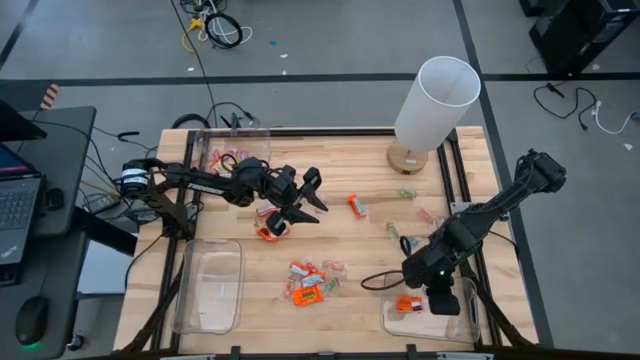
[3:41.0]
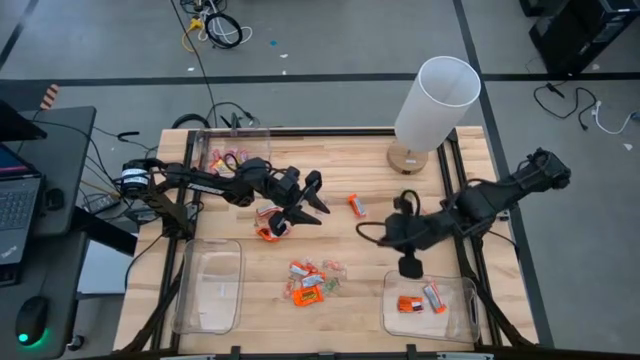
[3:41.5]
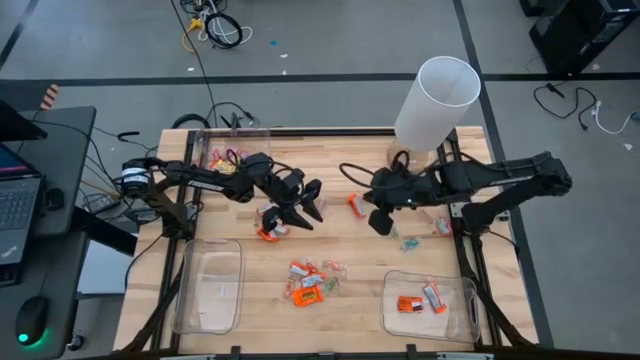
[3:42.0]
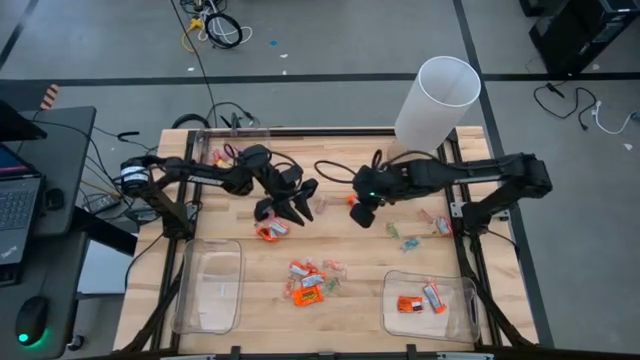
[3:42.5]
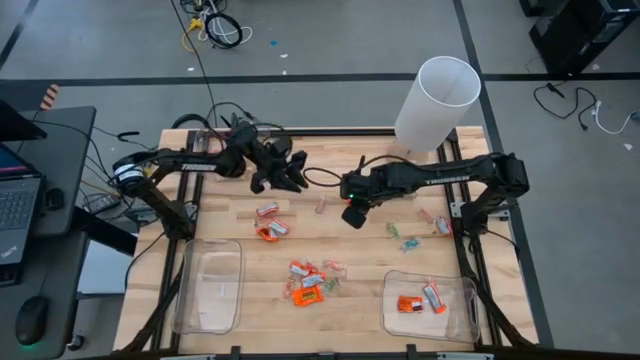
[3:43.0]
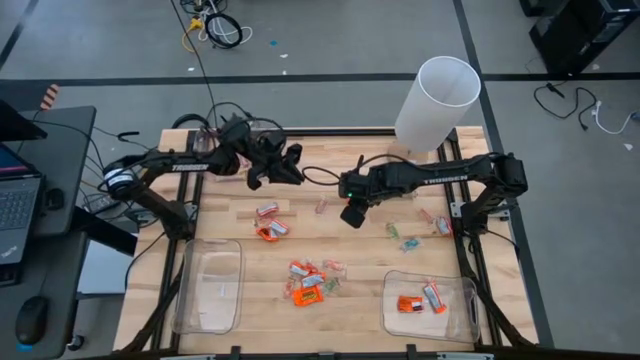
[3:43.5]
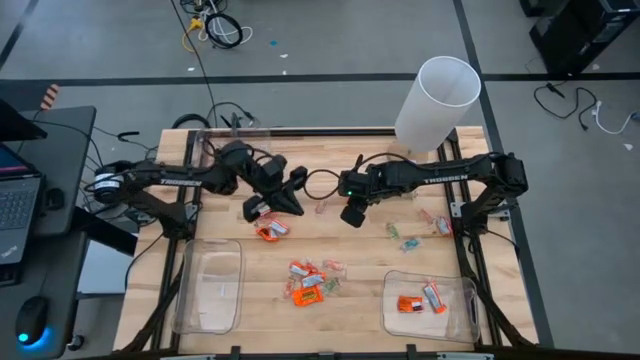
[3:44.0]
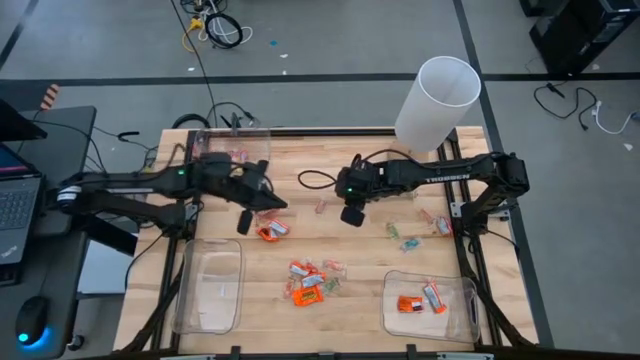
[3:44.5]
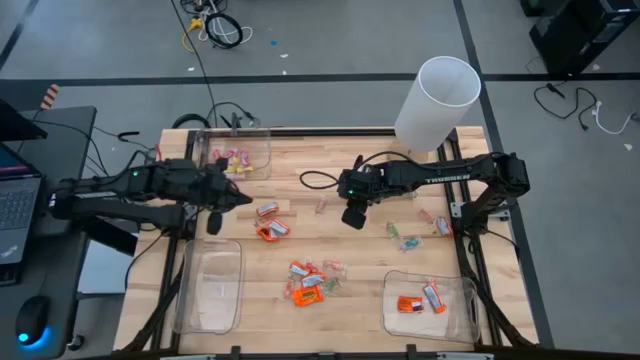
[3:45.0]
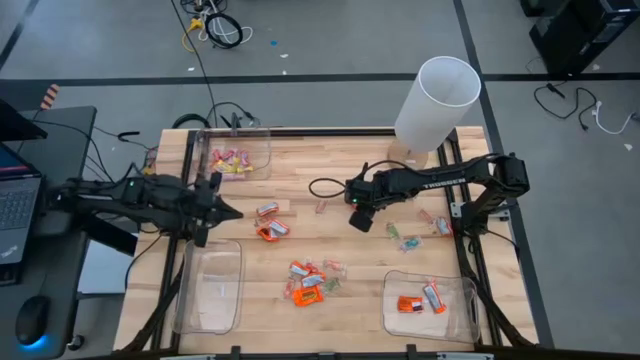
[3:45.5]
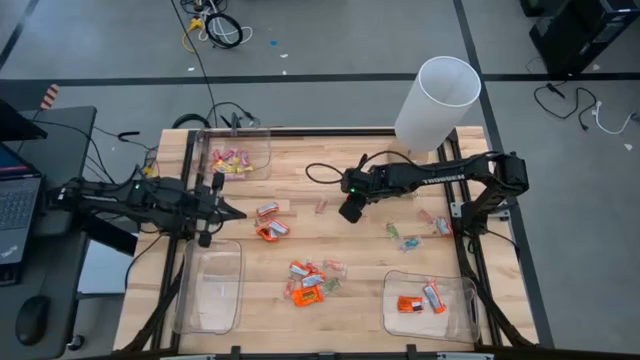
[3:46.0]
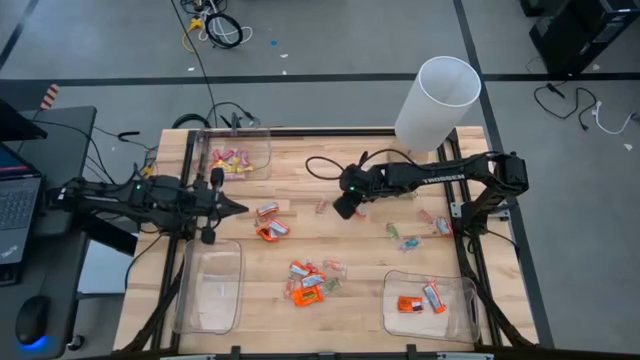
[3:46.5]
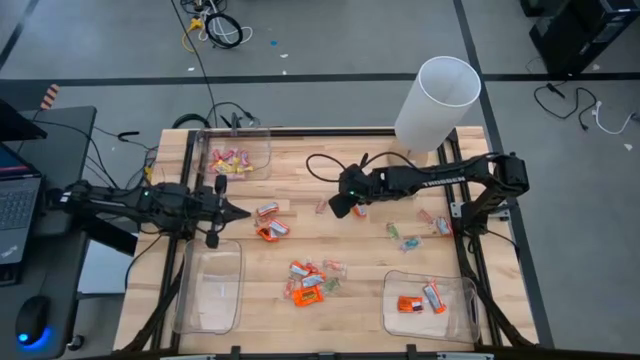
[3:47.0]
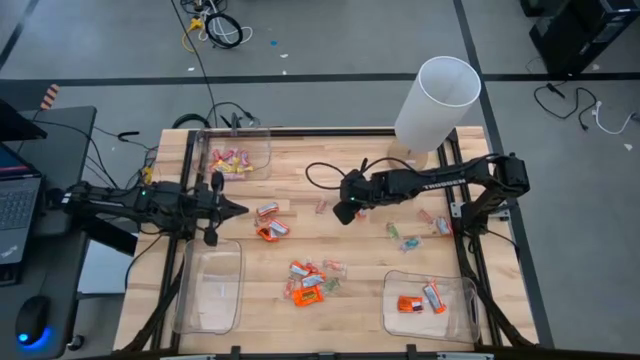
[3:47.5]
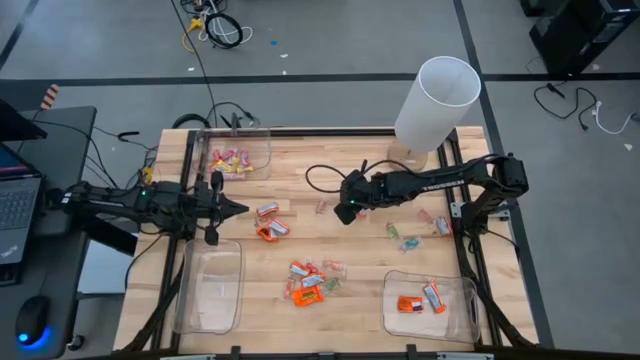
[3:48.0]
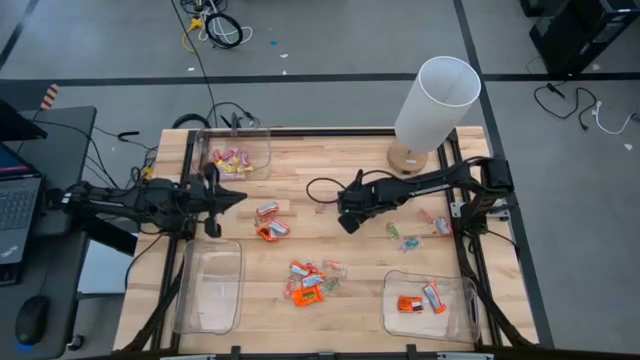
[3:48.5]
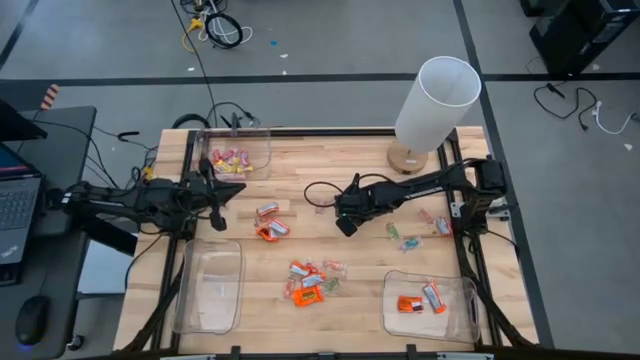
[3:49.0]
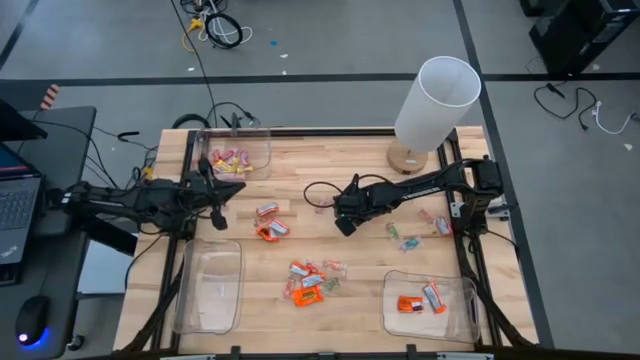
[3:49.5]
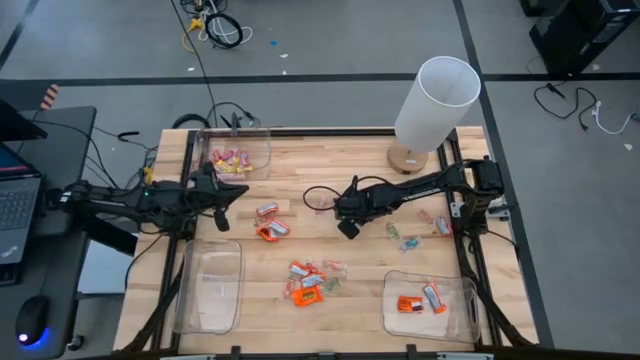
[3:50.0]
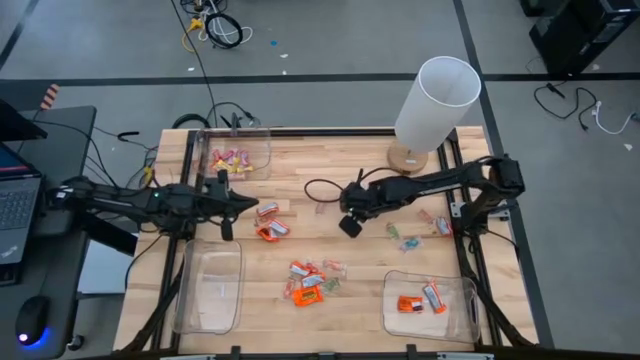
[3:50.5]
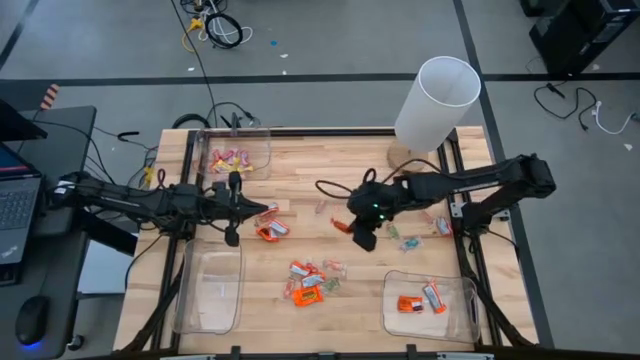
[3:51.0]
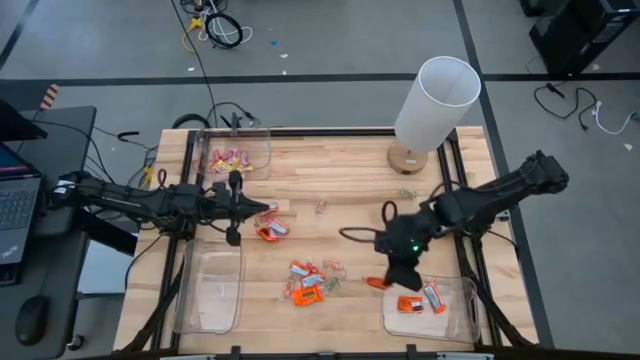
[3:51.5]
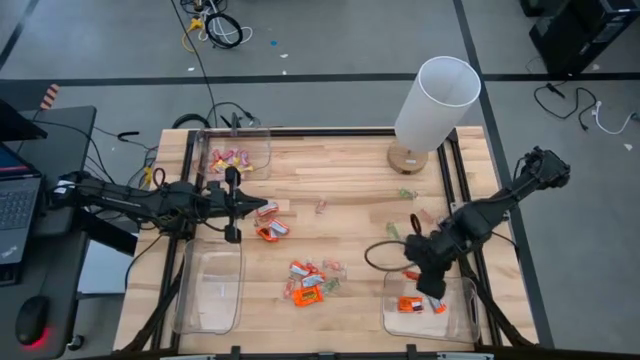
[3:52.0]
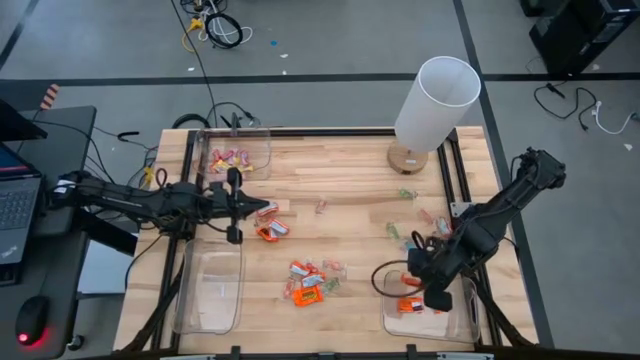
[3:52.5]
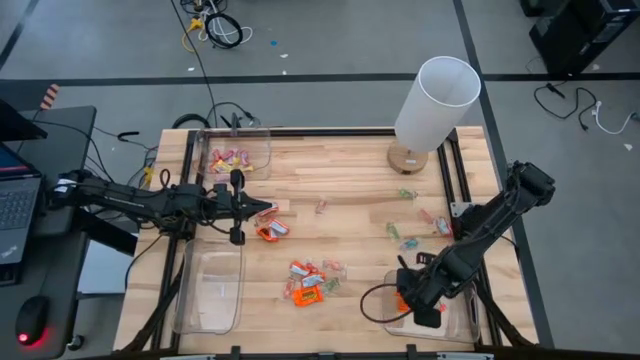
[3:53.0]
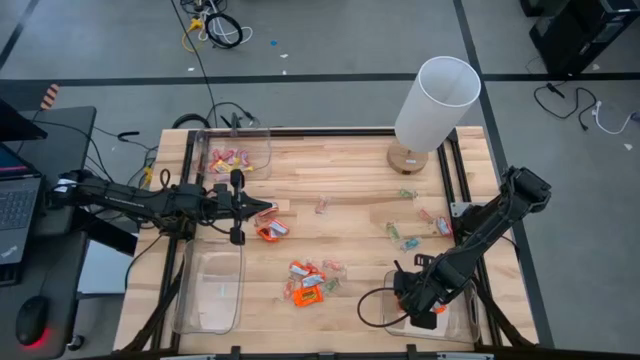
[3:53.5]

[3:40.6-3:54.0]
Task: Sort candy
Put the chocolate into the bottom right transparent bin

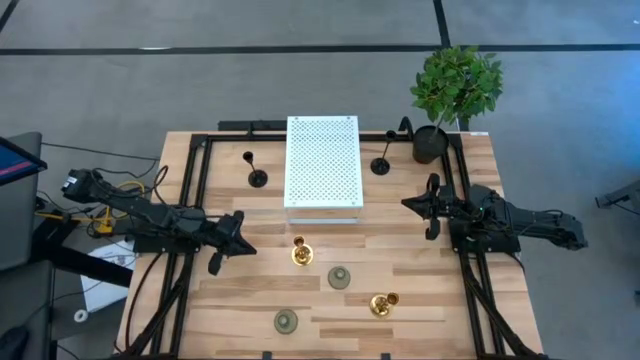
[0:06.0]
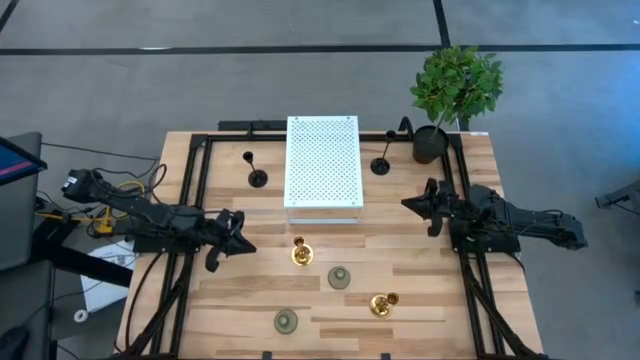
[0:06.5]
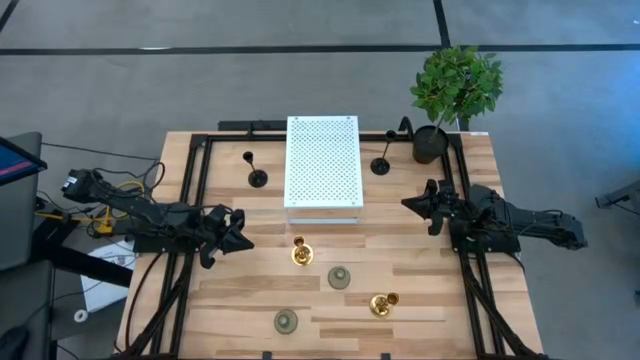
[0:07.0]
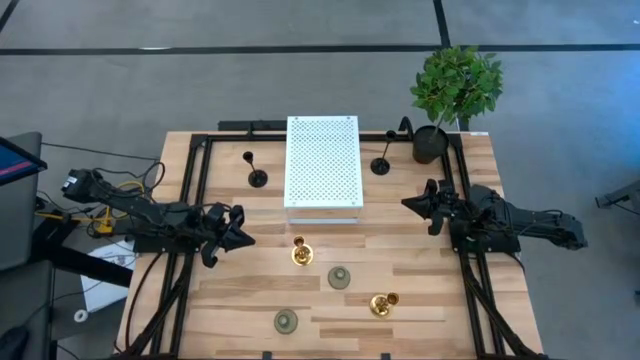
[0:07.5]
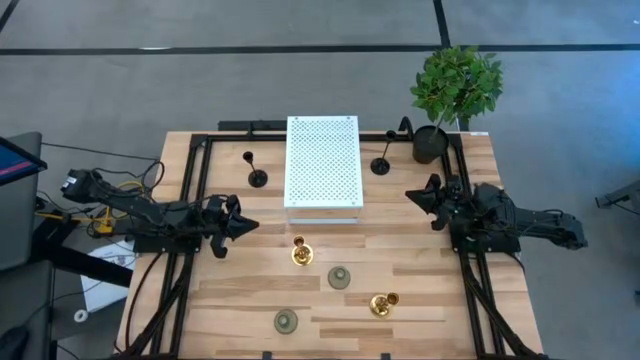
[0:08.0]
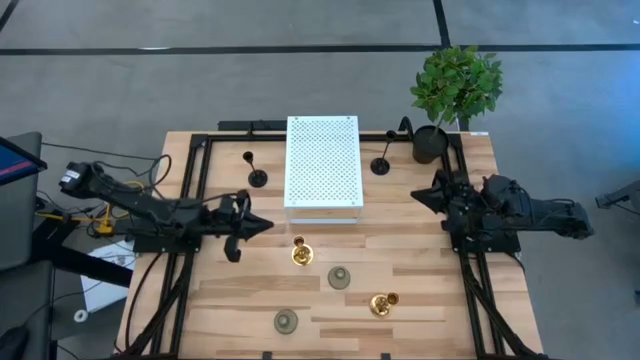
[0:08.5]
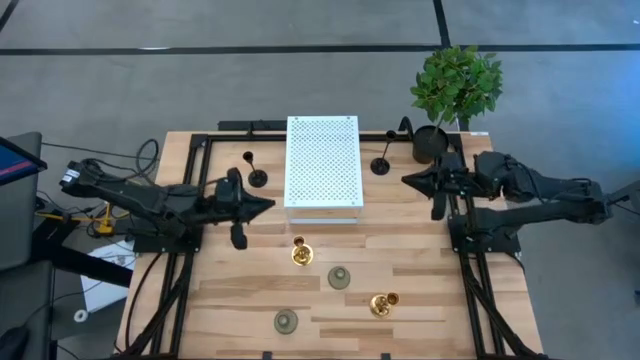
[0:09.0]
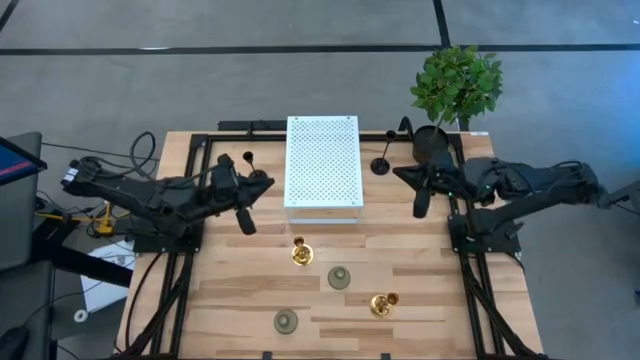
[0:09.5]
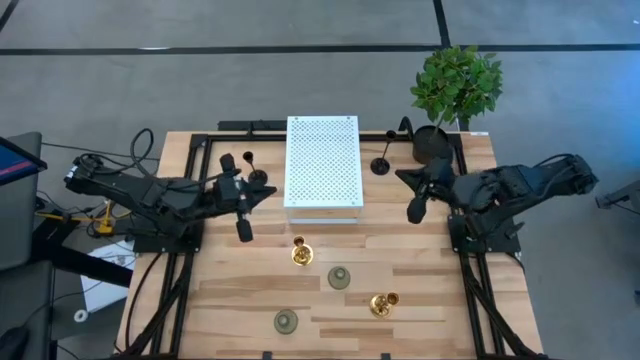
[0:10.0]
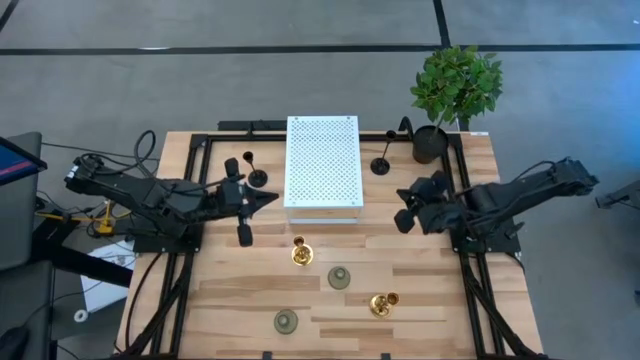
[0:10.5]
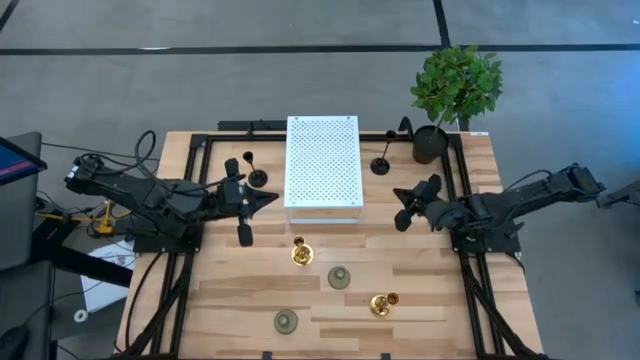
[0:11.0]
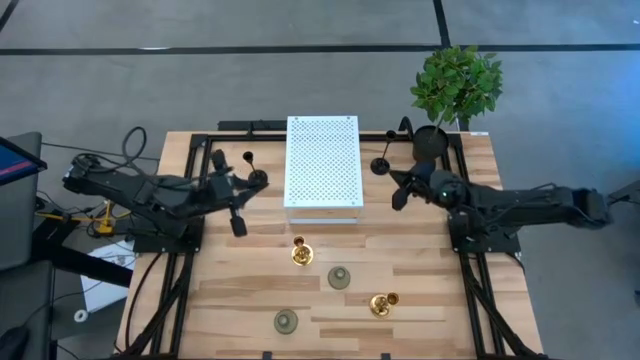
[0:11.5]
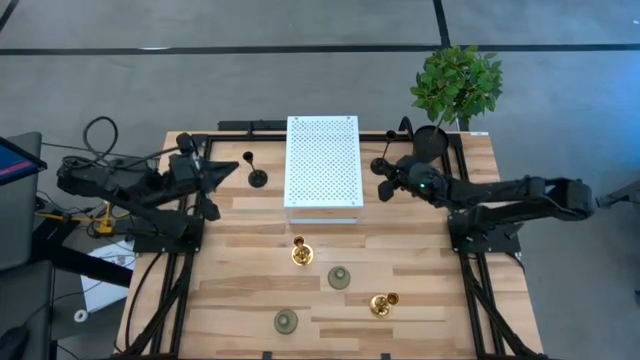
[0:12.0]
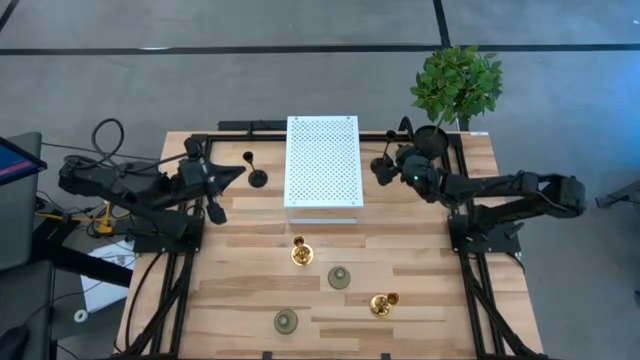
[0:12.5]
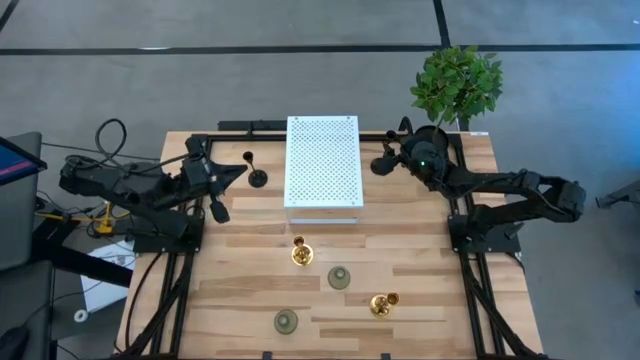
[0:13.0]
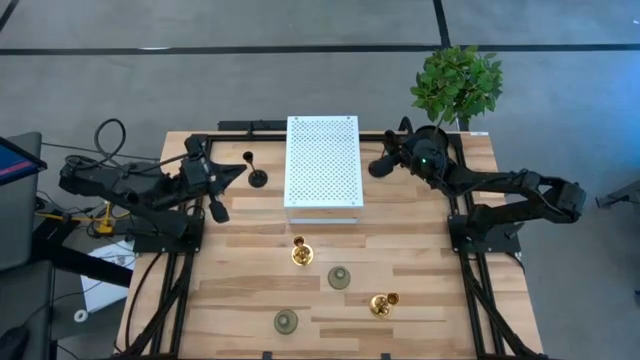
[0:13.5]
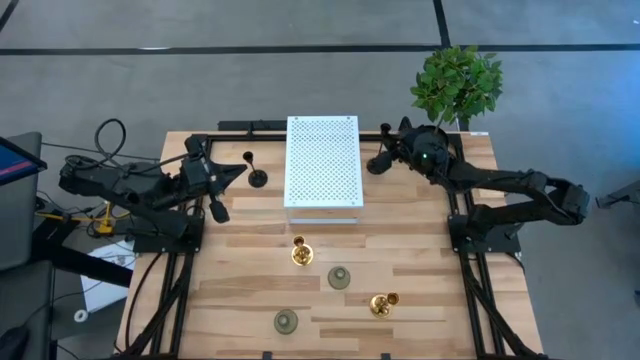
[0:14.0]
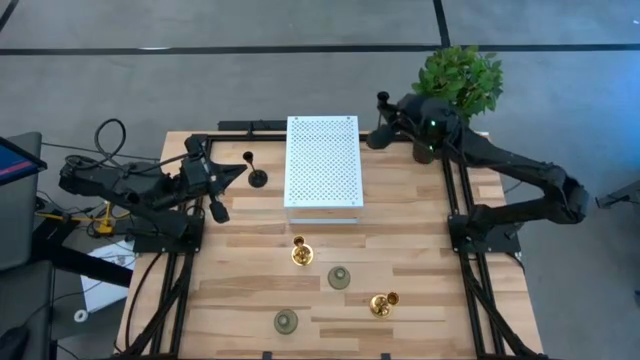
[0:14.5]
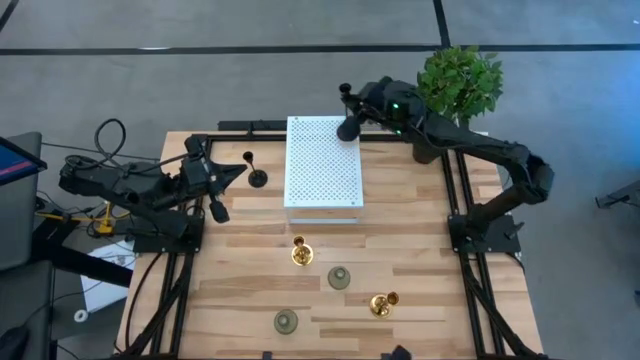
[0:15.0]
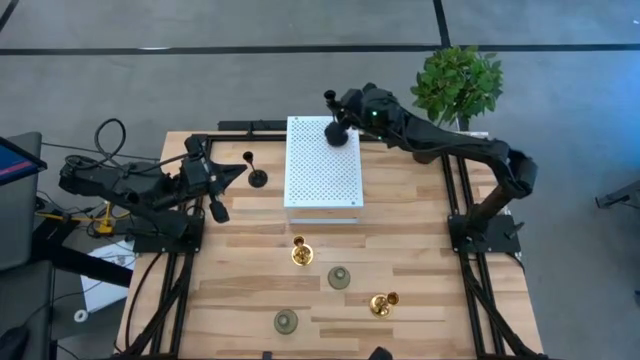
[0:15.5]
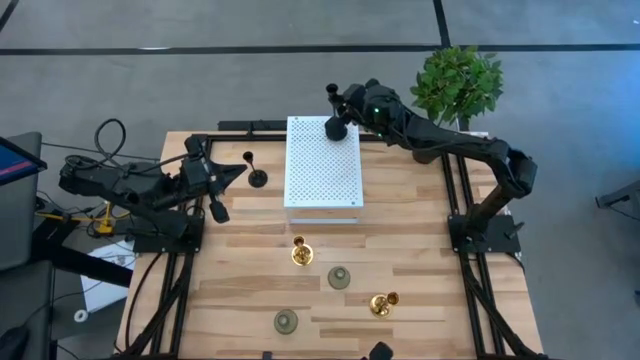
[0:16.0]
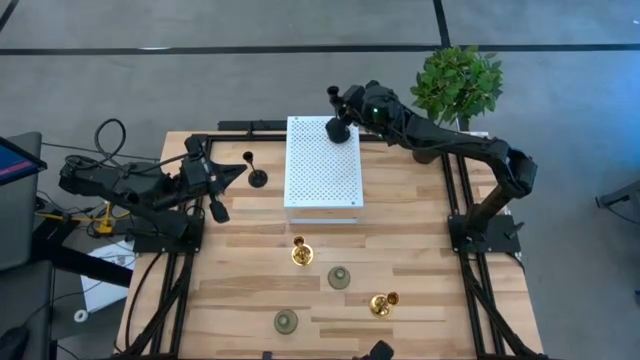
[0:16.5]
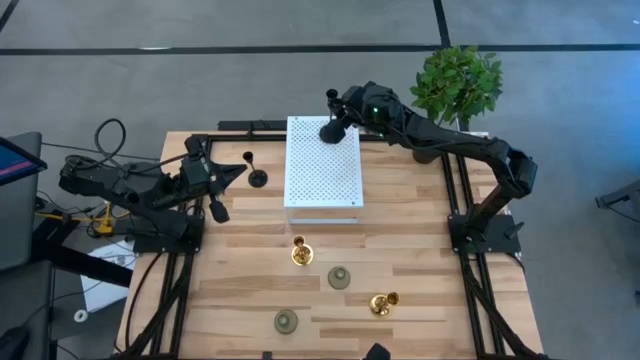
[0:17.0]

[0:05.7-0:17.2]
Task: Pick & Place candle stick holders
Put the right black candle holder on the shelf
